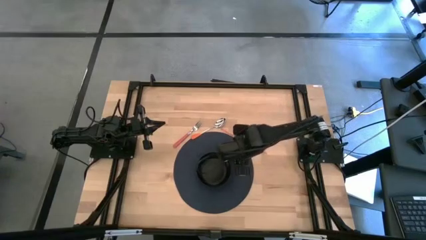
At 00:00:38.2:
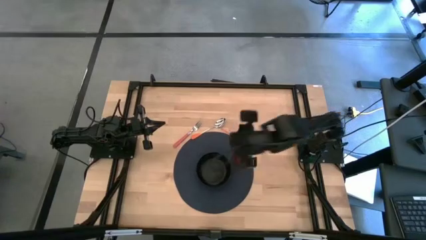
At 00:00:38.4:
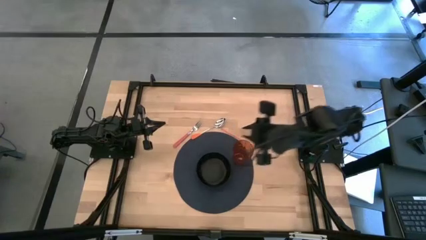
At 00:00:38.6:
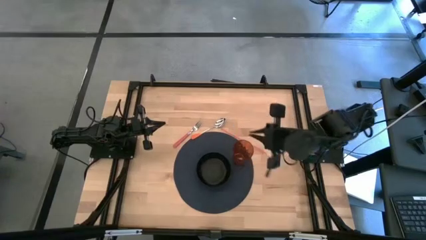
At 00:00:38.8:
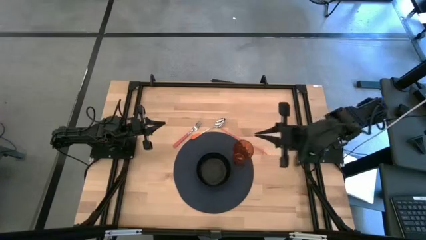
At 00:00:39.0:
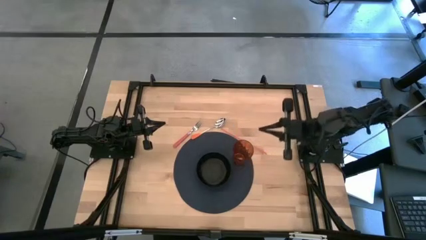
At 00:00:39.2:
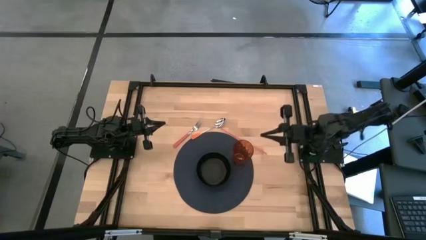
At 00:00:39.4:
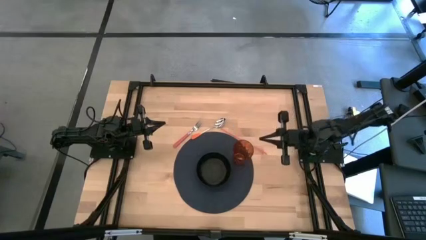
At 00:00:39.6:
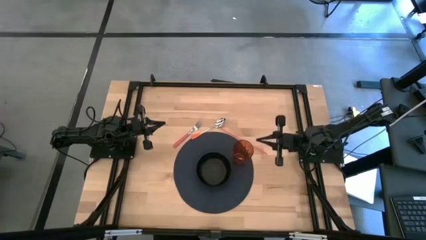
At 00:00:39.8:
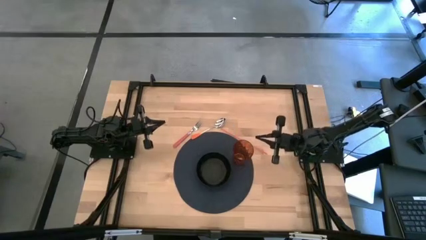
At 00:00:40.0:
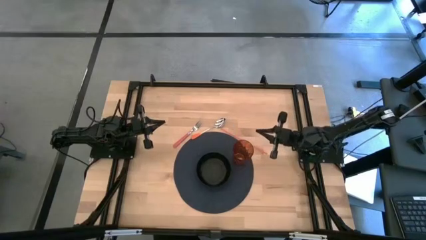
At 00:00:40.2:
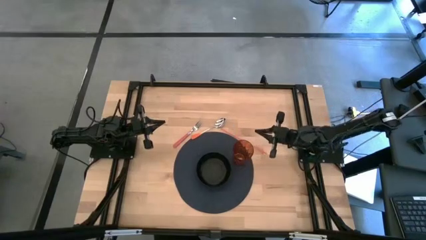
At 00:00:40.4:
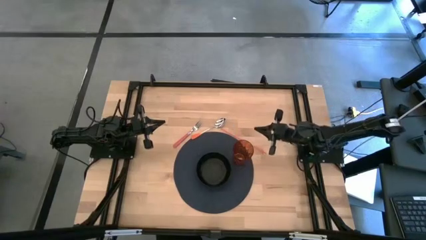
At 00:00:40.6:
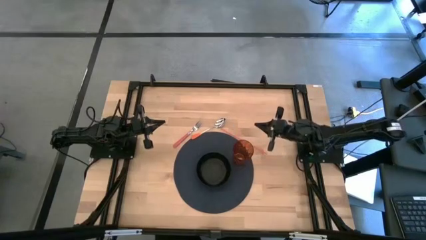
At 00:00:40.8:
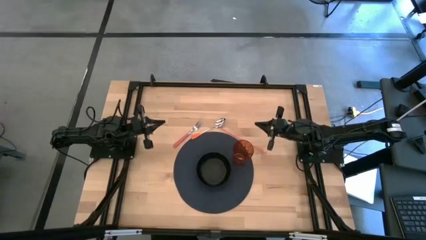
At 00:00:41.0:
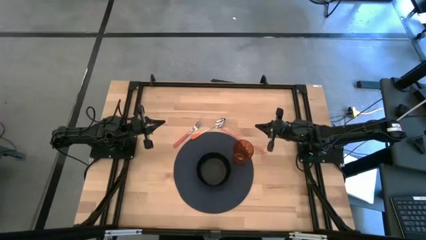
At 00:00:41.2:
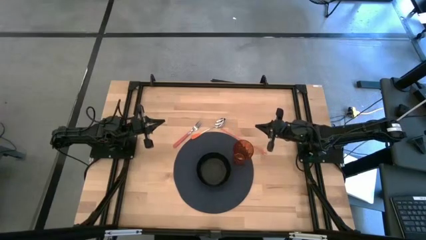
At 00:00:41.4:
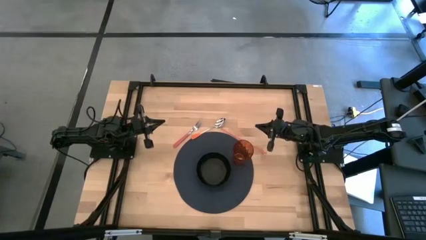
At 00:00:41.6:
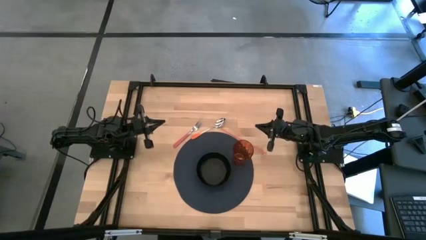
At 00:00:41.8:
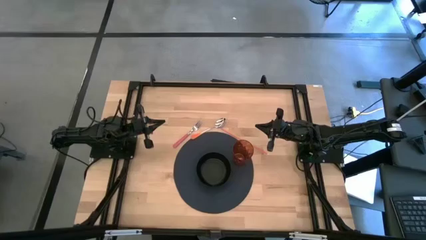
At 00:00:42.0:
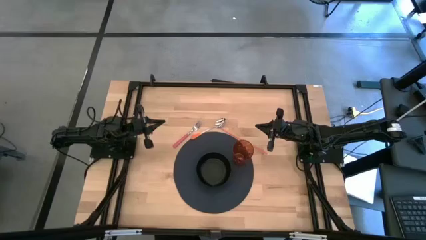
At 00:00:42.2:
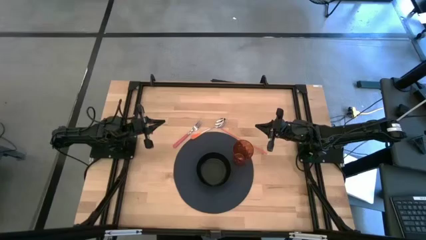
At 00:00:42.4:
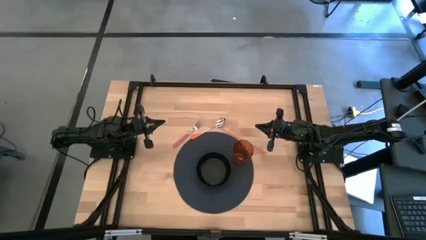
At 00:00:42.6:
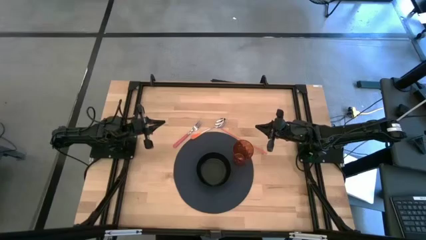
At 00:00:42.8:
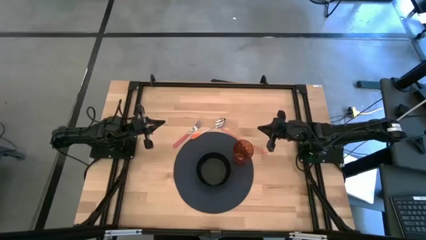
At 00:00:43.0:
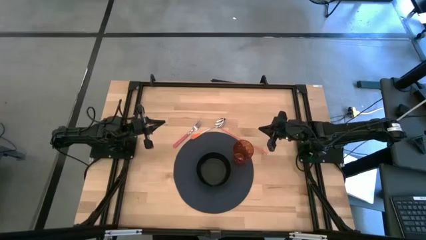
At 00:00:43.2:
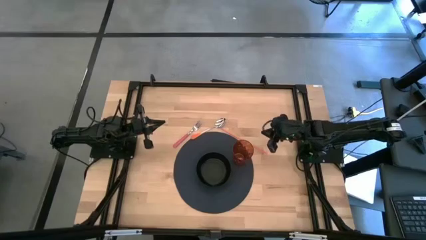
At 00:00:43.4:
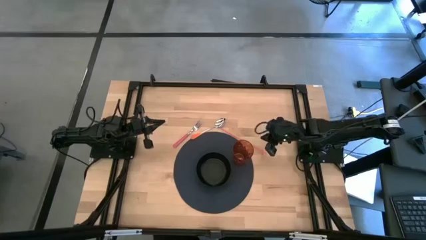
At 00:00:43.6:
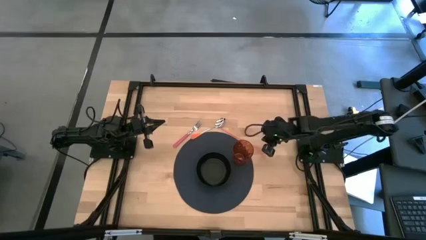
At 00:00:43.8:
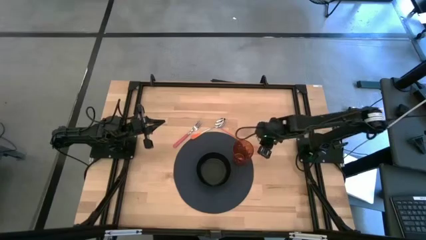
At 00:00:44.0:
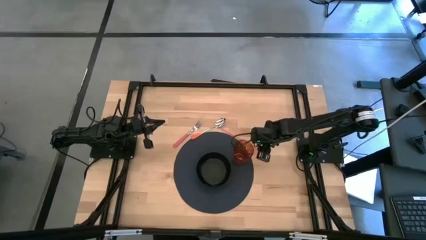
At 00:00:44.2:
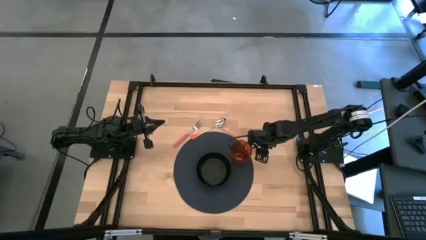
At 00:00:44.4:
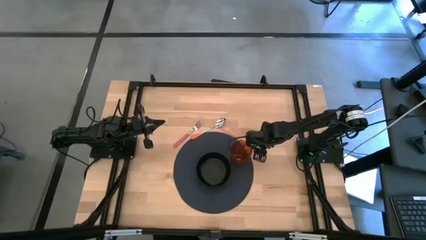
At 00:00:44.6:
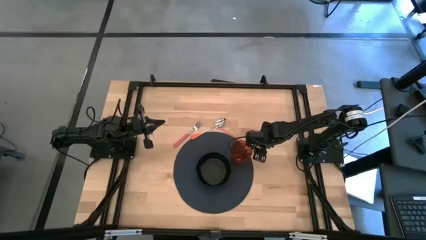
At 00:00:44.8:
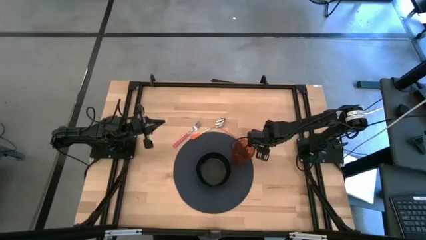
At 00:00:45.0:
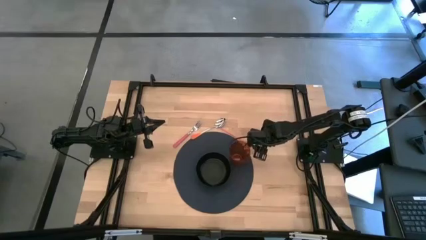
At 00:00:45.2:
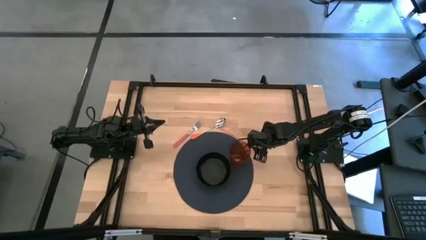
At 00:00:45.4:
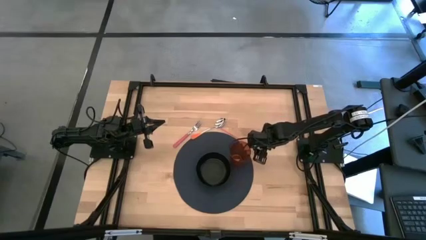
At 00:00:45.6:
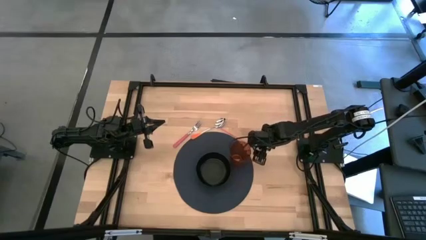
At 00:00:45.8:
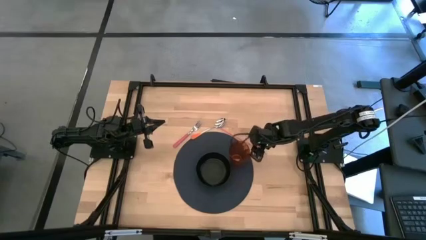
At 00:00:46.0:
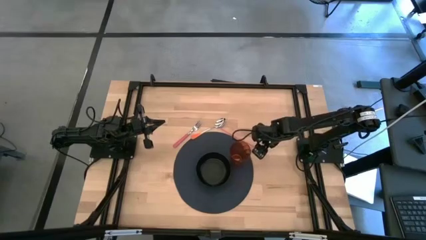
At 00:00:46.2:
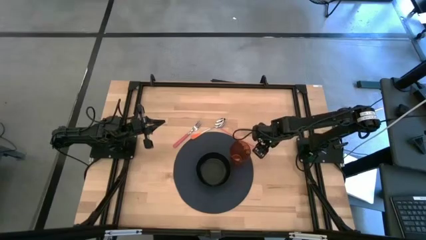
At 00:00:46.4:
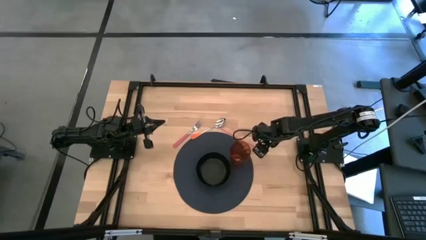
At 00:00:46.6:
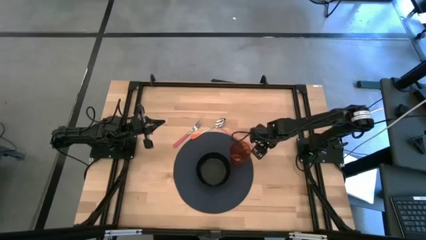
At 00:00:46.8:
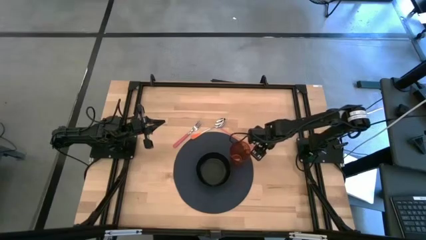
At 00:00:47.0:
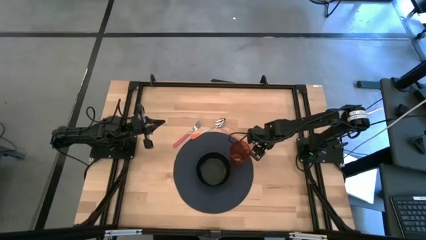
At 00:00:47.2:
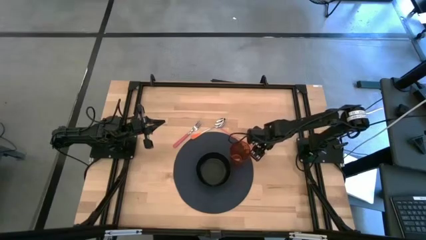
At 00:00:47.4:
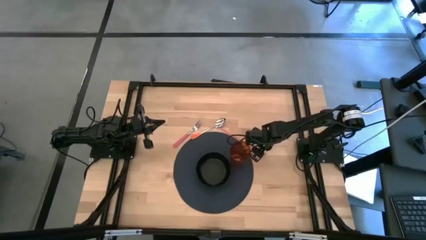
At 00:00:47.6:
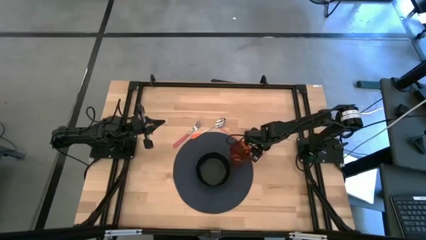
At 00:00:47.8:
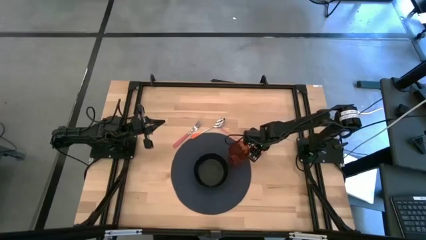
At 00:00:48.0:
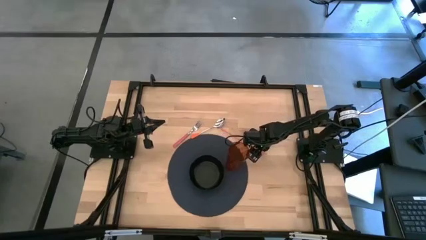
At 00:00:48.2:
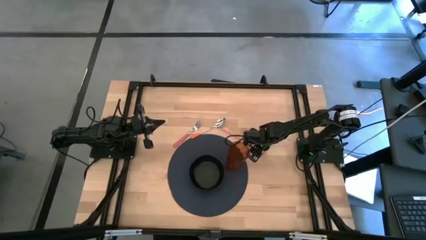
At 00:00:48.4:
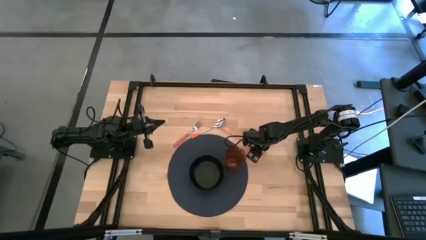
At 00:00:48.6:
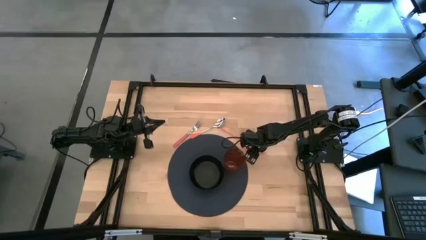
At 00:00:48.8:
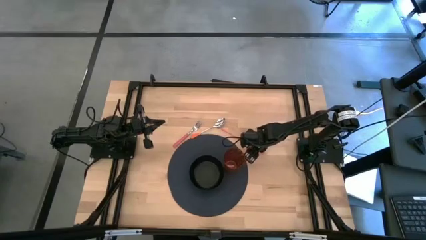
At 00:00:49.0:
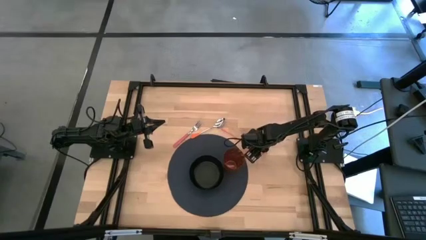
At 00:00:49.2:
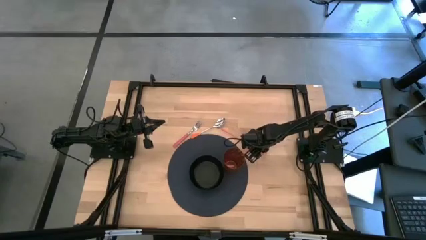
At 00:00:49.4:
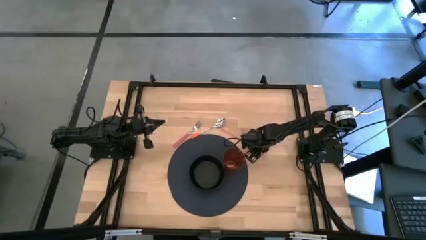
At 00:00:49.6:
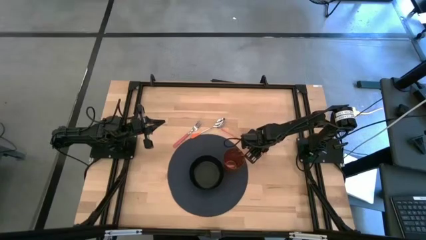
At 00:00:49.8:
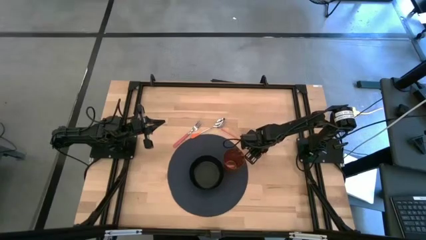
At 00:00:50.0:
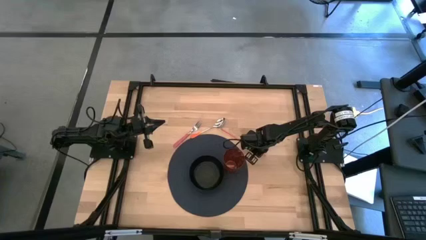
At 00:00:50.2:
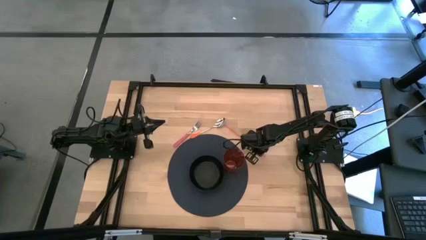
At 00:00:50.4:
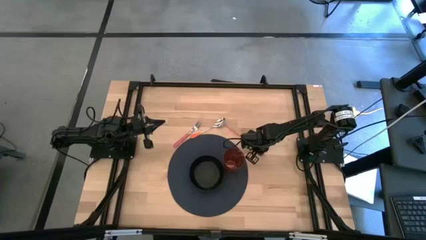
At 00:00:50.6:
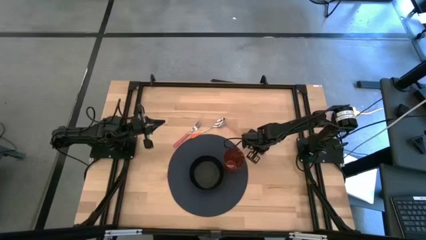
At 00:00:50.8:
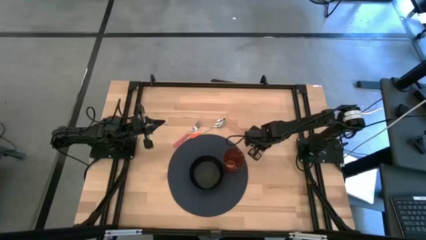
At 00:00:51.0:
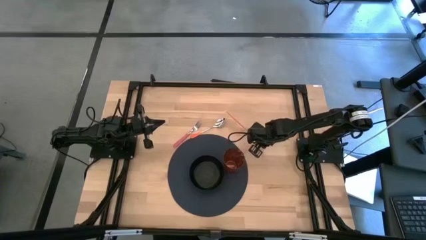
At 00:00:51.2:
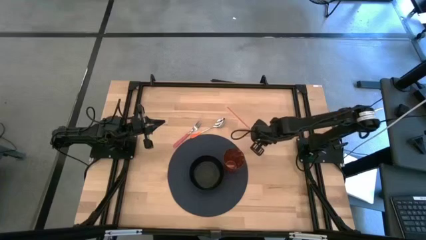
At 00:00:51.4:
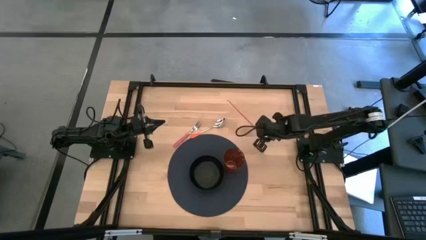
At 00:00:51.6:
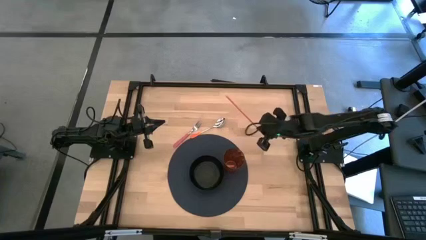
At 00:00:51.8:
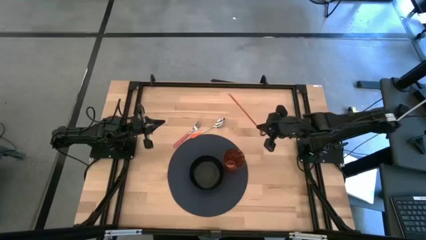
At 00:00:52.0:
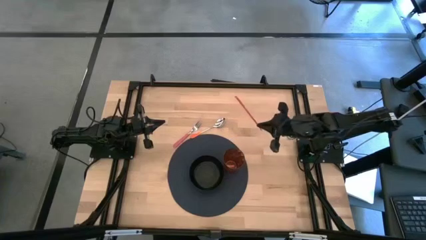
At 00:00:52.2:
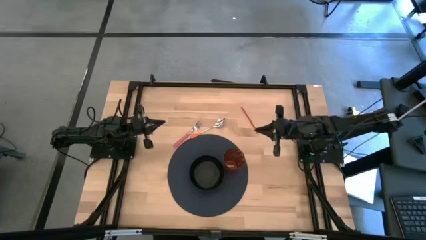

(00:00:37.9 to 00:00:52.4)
Task: Pick & Place Utensil
Put the red straw into the orange cup
